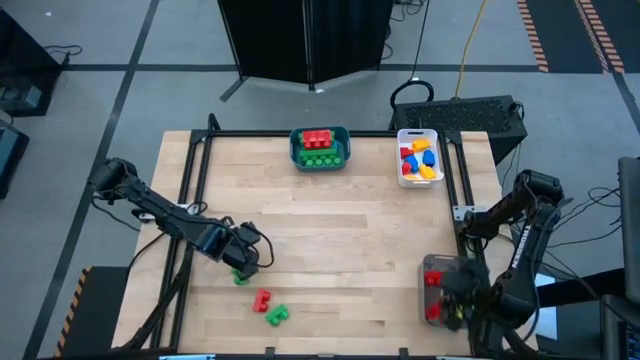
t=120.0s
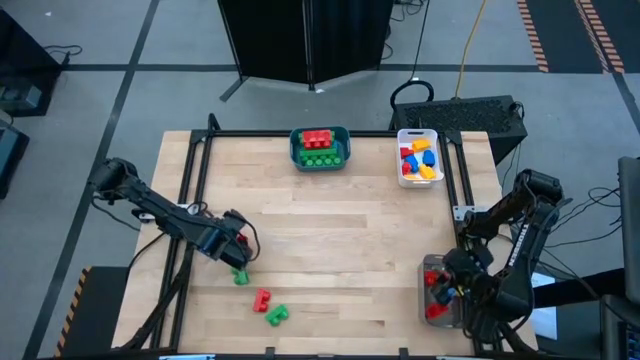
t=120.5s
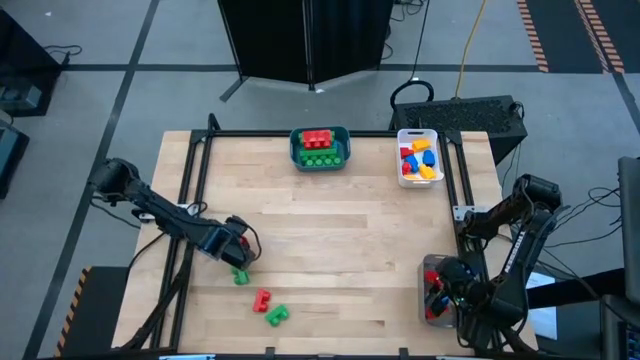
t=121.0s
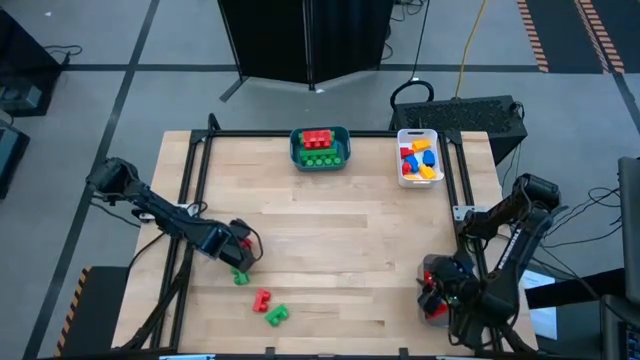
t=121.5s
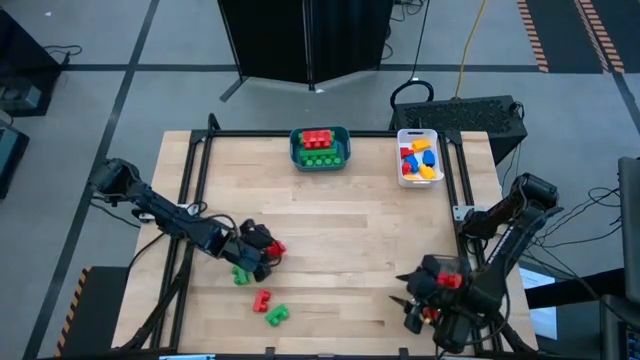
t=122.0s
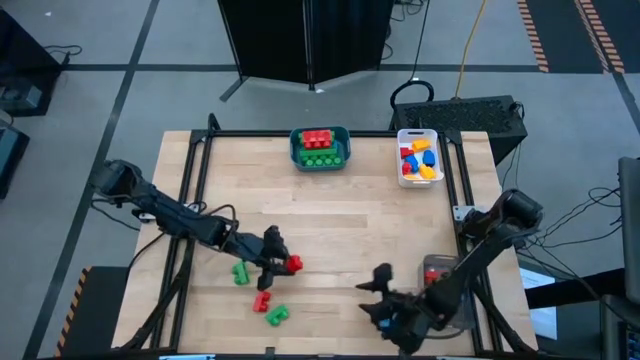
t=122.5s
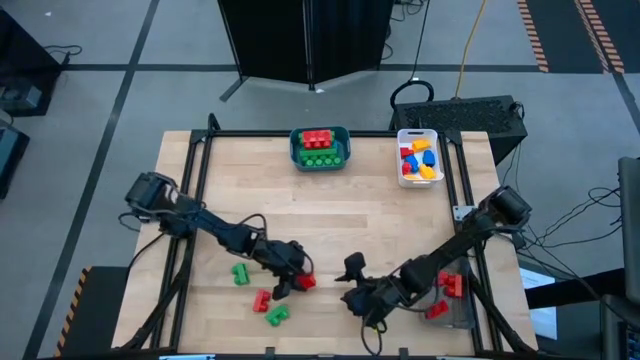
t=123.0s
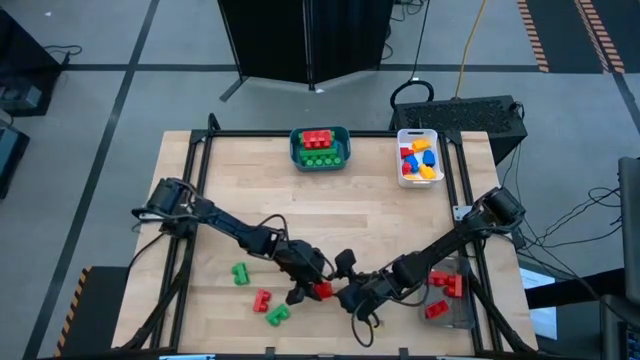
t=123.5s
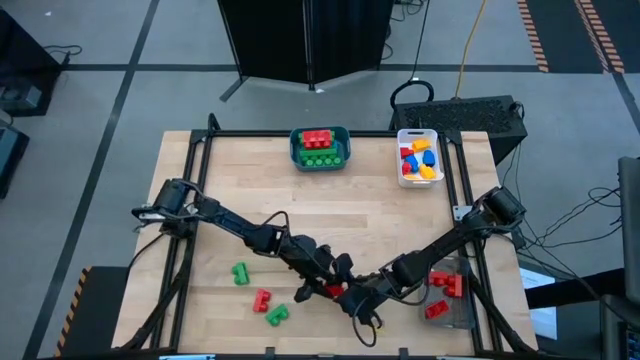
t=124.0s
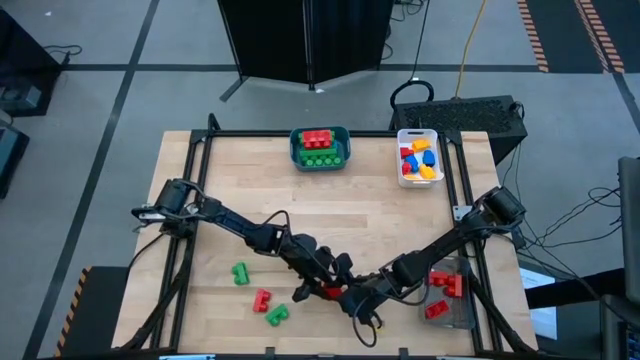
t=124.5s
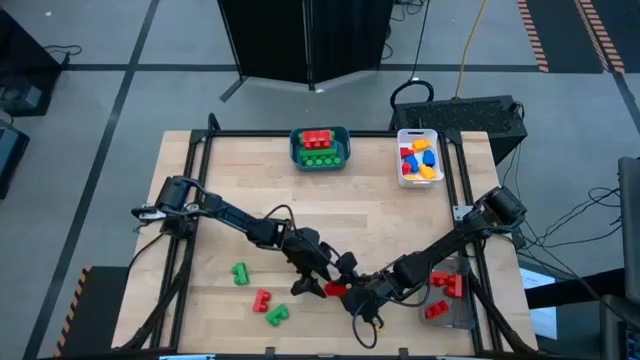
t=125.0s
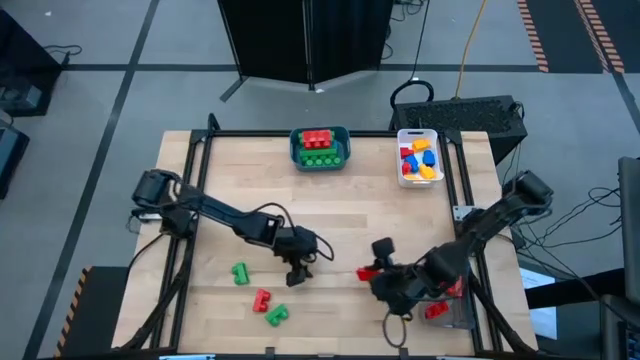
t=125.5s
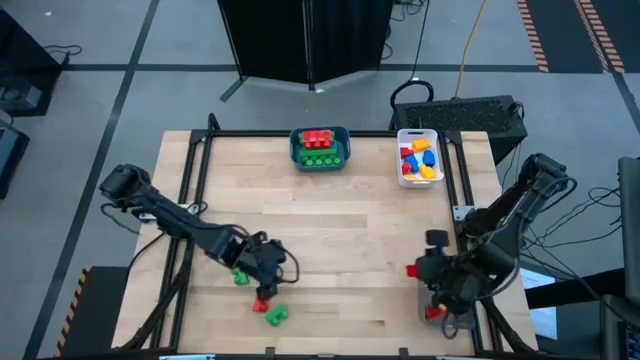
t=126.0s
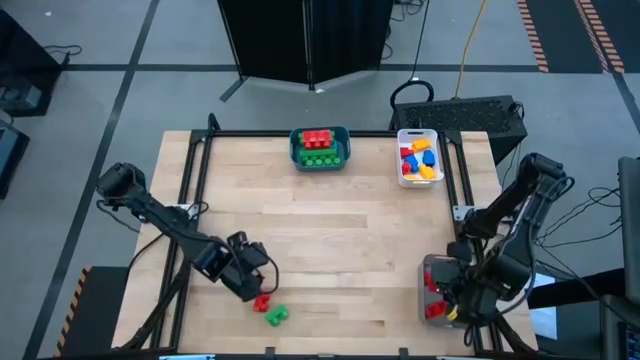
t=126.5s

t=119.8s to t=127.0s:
Task: Sort blocks by size
Put the two stud red game piece into the black transparent bin

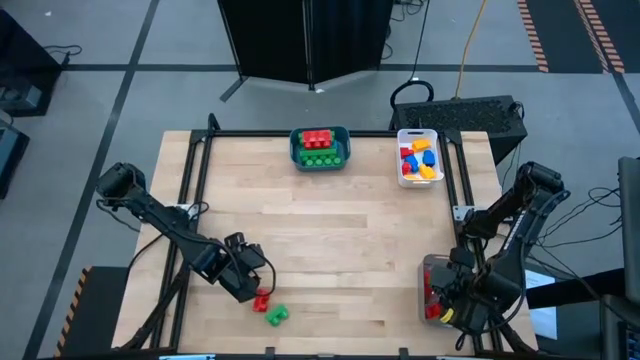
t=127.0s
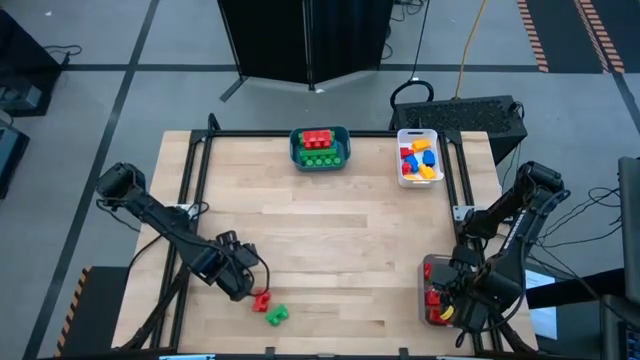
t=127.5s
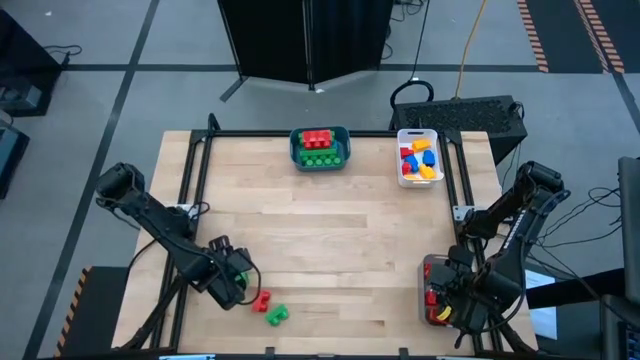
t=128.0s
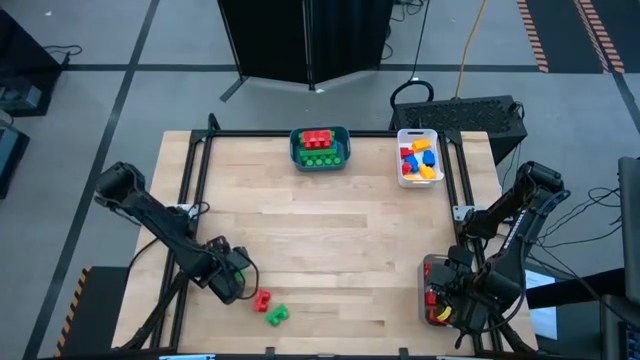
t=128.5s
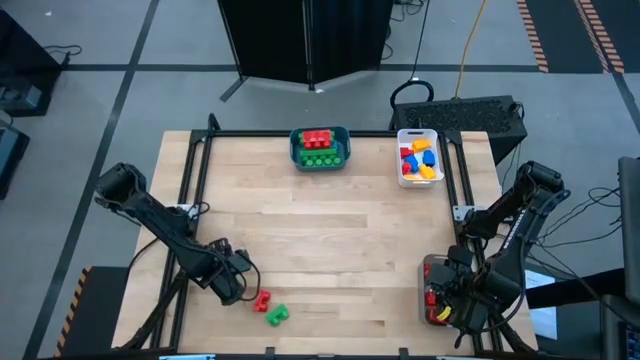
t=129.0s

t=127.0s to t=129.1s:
Put the two stud green game piece into the black transparent bin

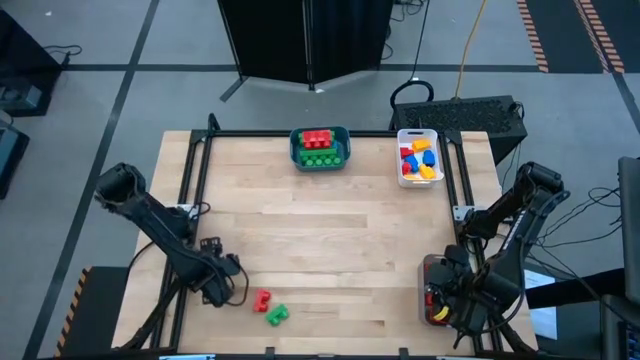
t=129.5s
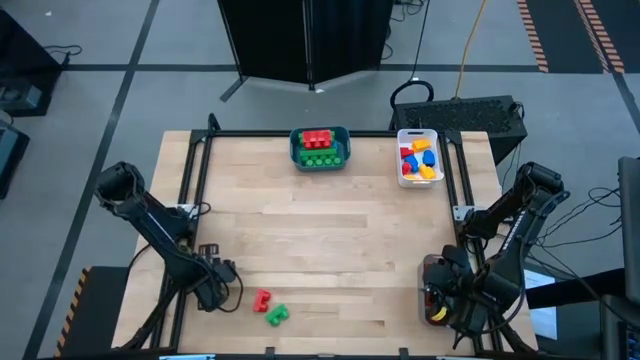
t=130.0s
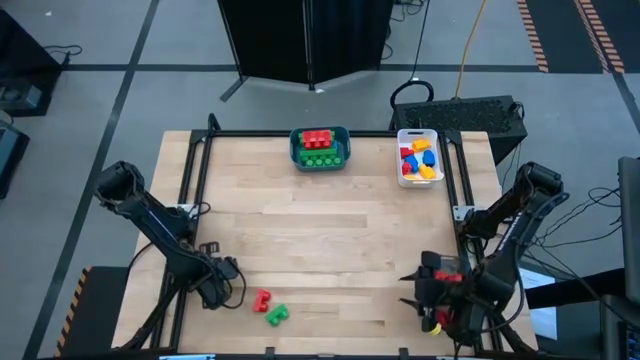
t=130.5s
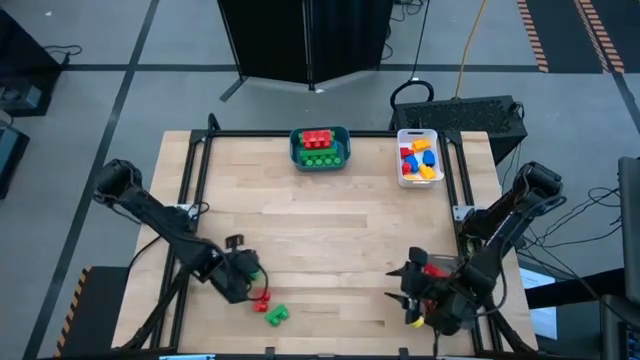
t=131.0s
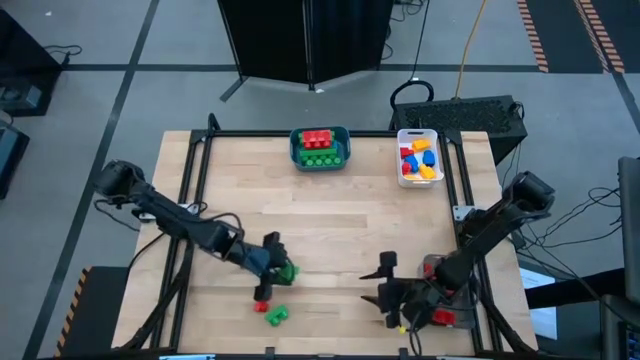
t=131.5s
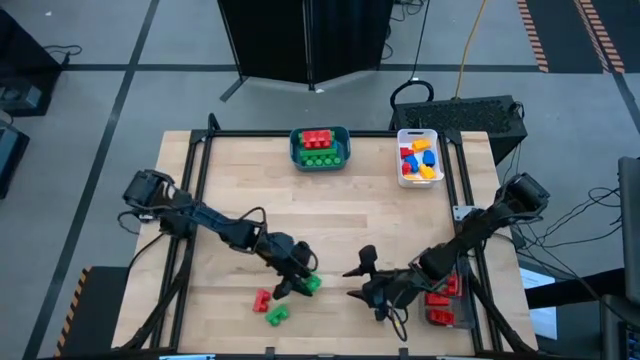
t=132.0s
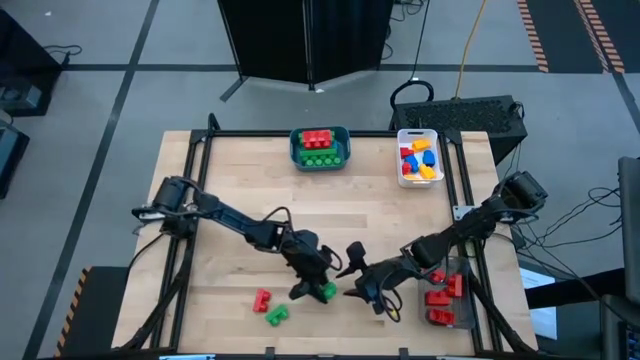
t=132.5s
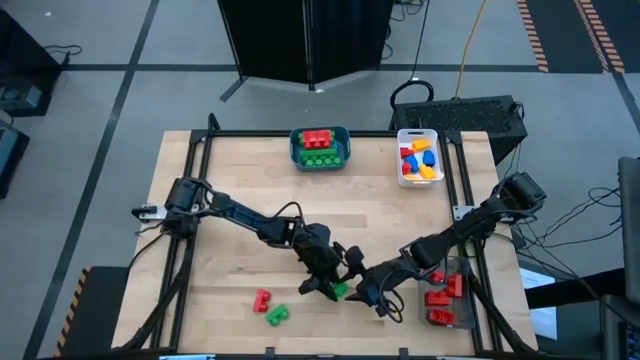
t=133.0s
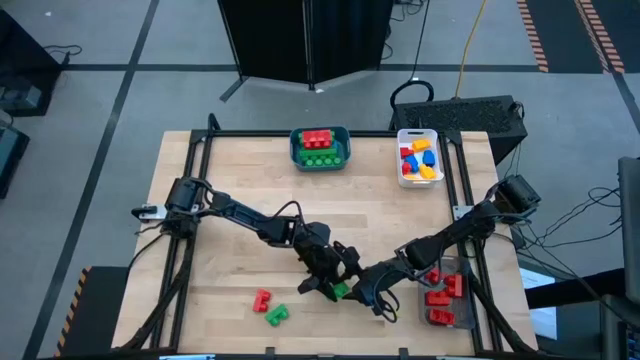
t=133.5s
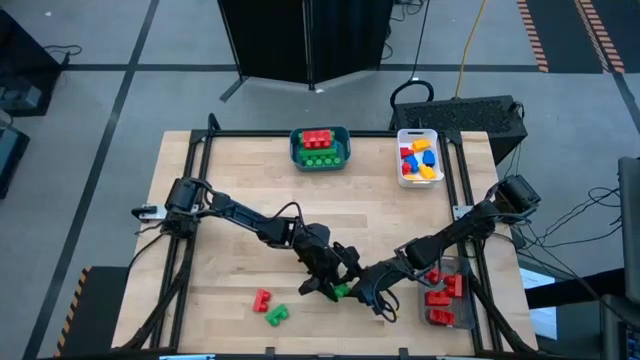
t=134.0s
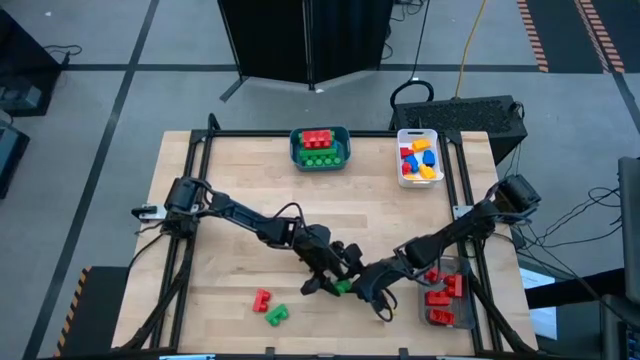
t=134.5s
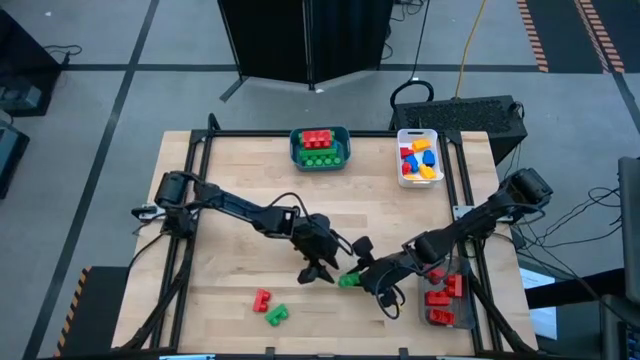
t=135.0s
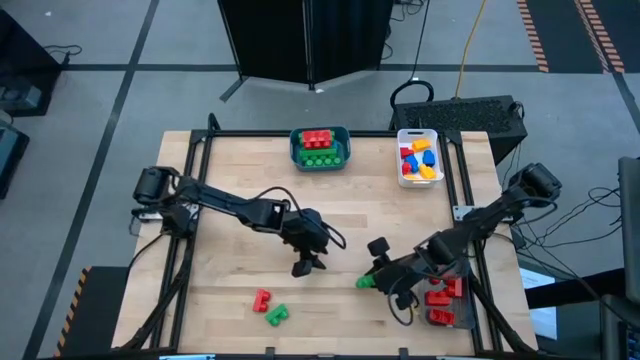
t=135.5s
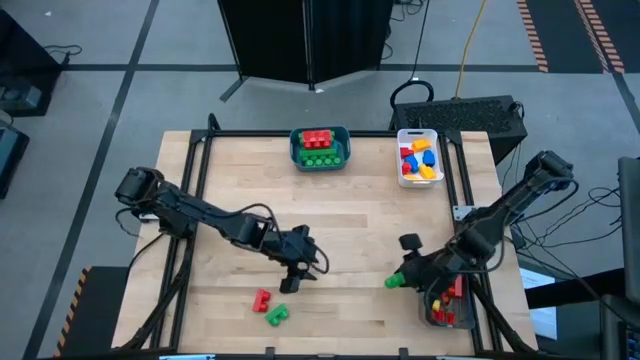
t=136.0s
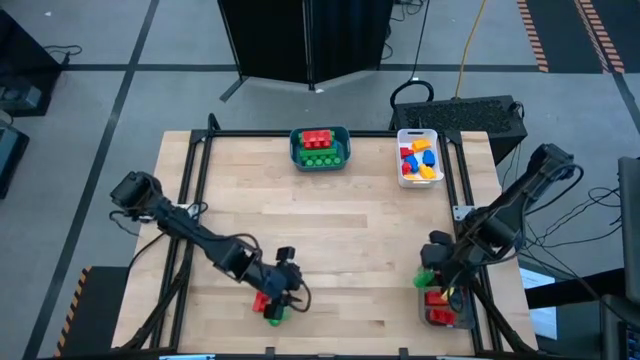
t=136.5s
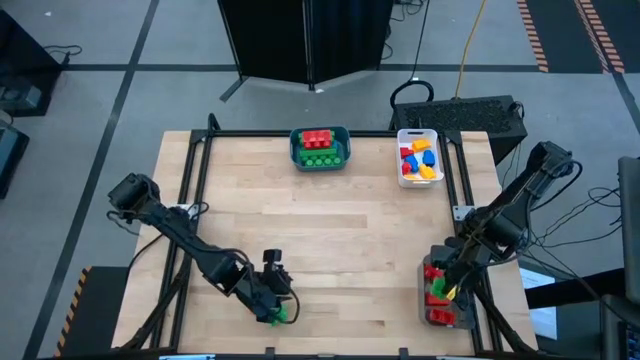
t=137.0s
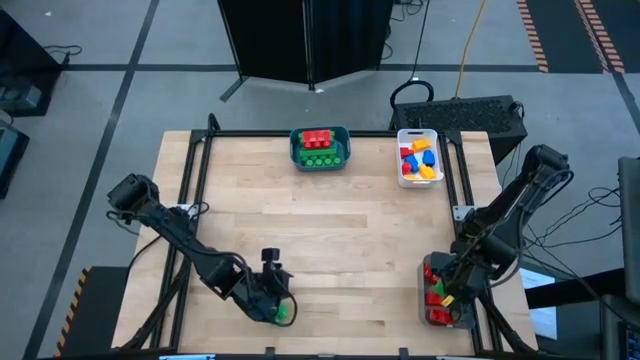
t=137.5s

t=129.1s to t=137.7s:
Put the two stud green game piece into the black transparent bin

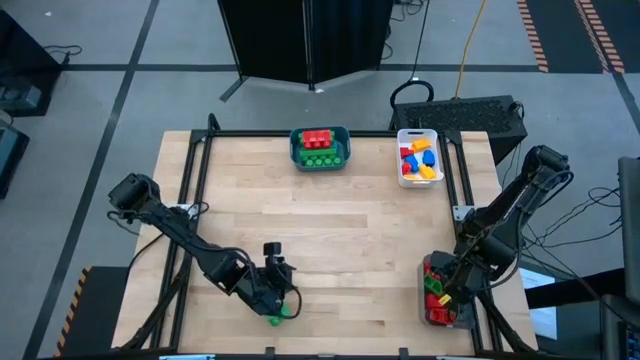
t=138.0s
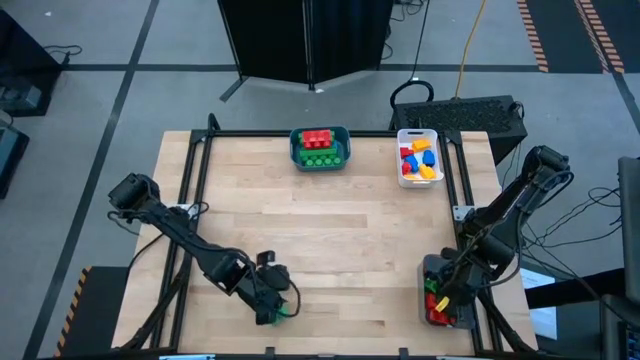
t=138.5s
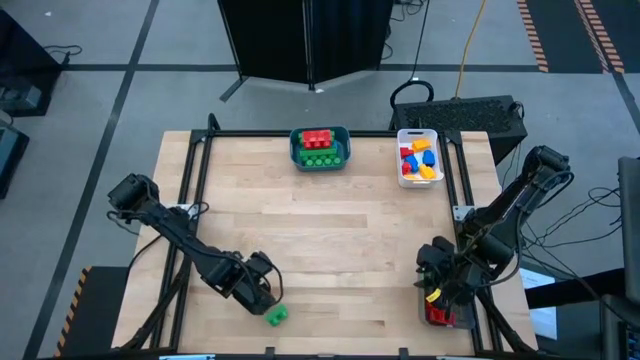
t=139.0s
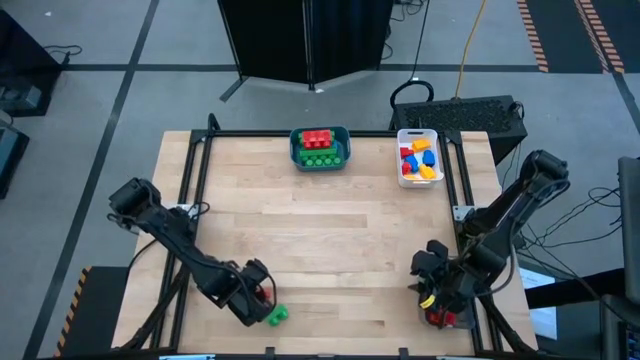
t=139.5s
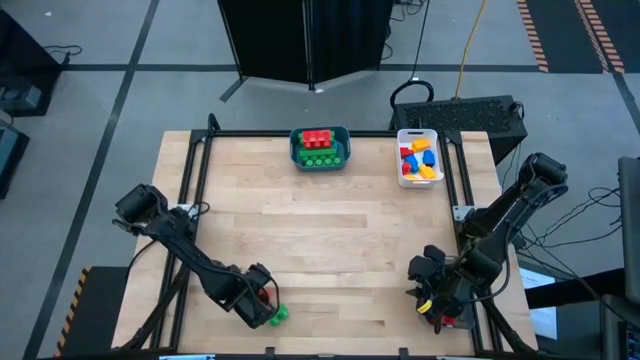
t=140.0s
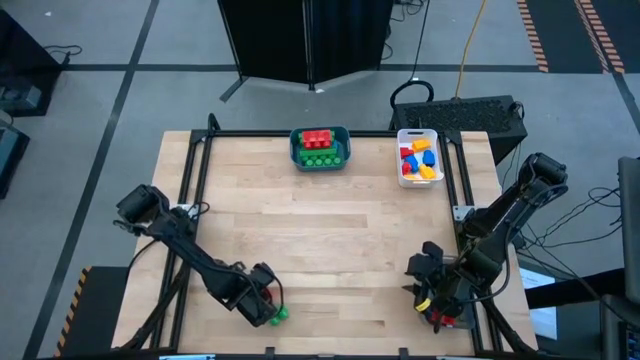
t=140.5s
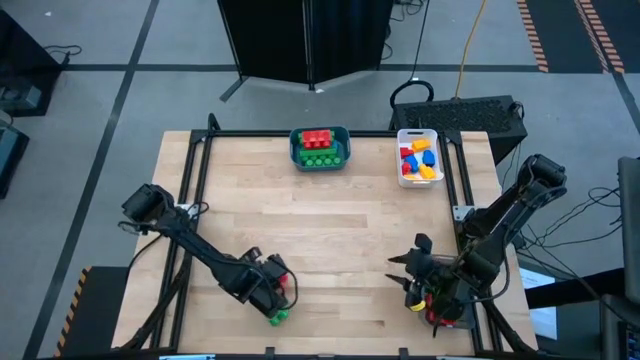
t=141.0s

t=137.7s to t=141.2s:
Put the two stud red game piece into the black transparent bin
